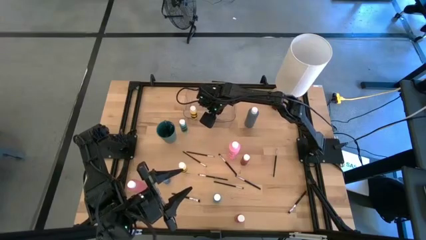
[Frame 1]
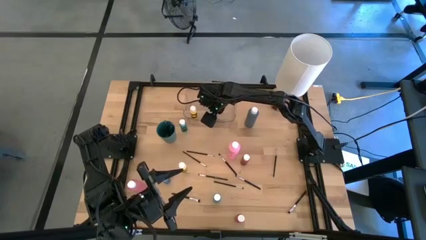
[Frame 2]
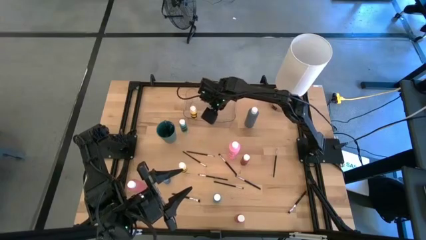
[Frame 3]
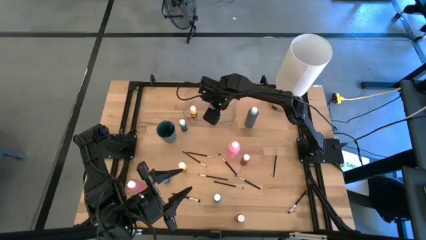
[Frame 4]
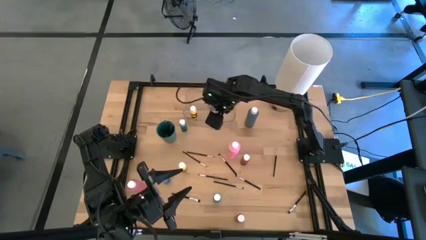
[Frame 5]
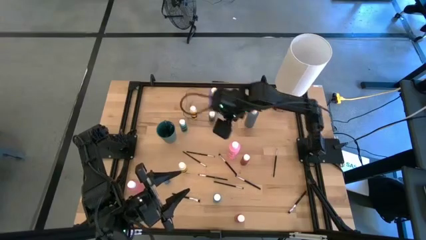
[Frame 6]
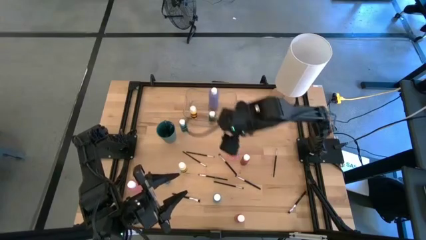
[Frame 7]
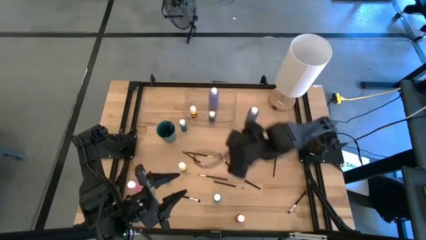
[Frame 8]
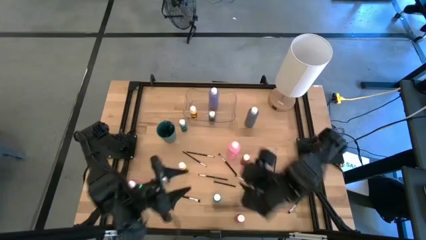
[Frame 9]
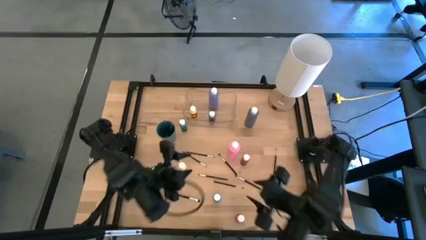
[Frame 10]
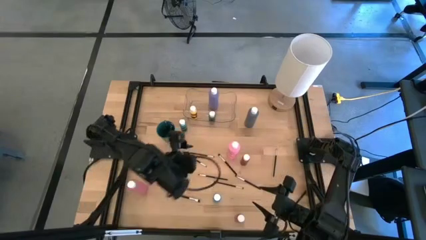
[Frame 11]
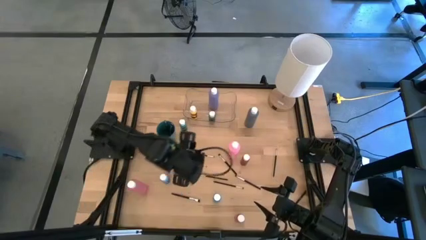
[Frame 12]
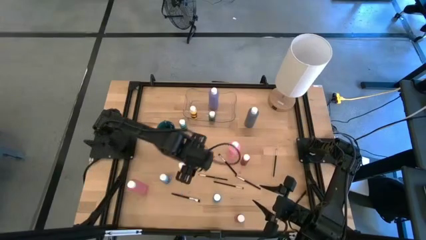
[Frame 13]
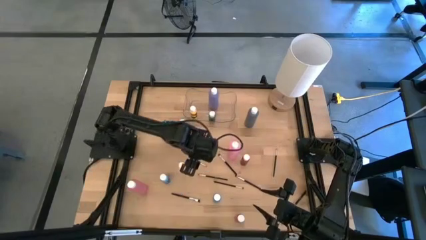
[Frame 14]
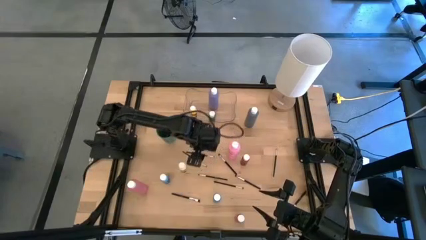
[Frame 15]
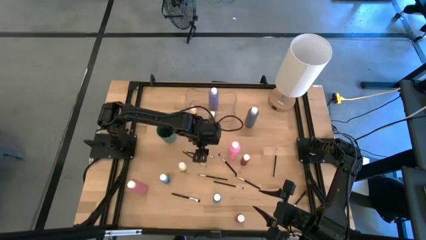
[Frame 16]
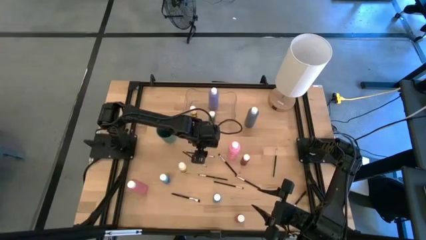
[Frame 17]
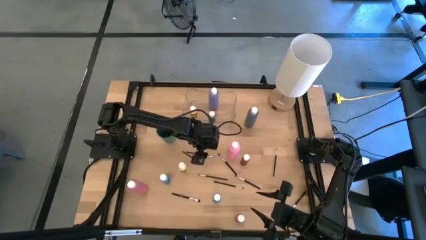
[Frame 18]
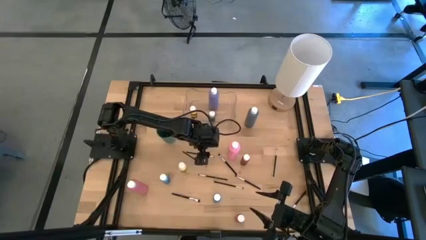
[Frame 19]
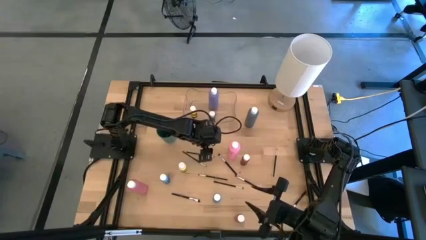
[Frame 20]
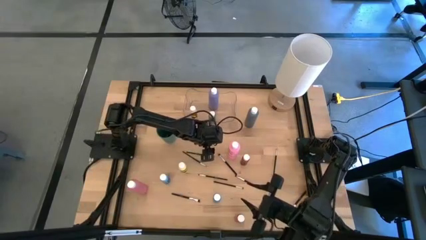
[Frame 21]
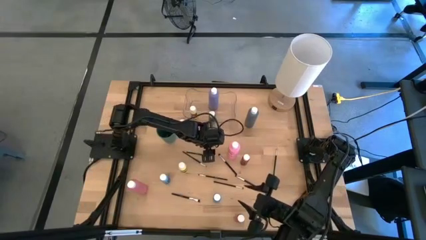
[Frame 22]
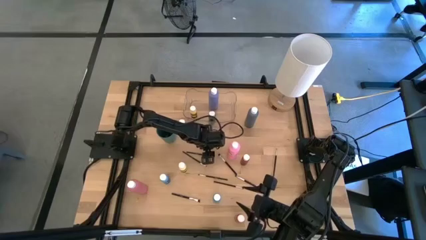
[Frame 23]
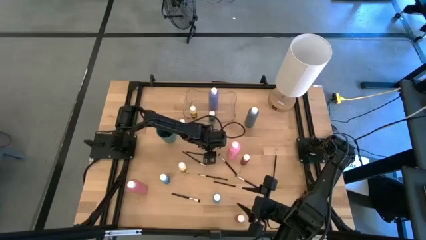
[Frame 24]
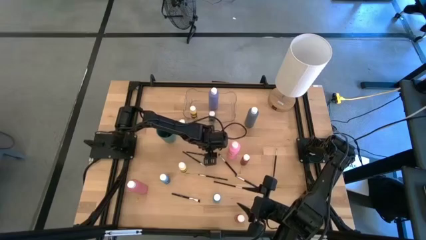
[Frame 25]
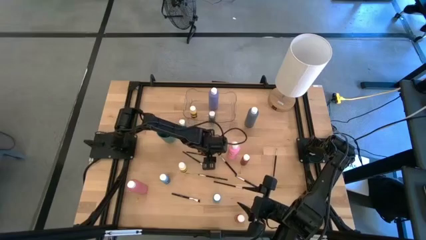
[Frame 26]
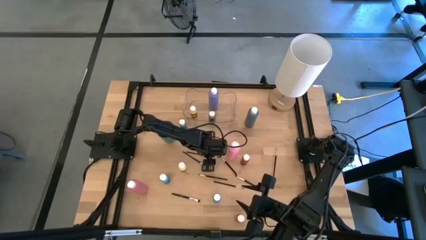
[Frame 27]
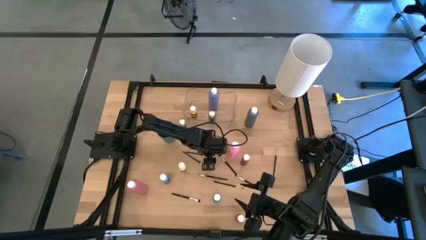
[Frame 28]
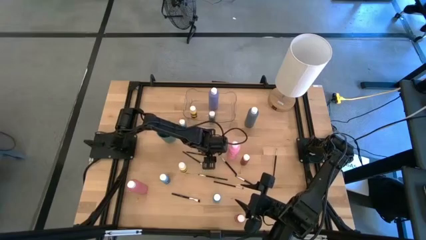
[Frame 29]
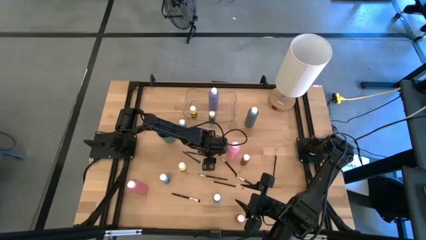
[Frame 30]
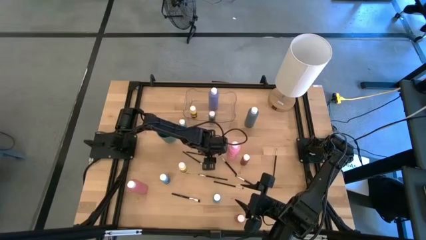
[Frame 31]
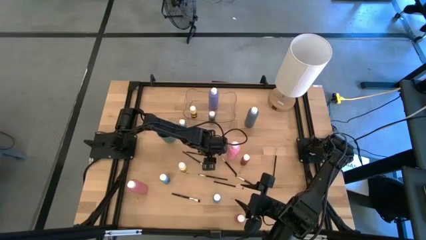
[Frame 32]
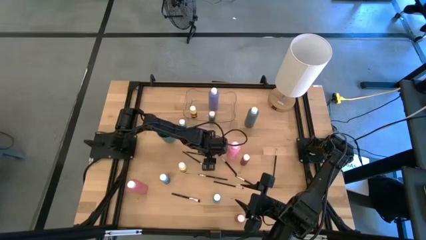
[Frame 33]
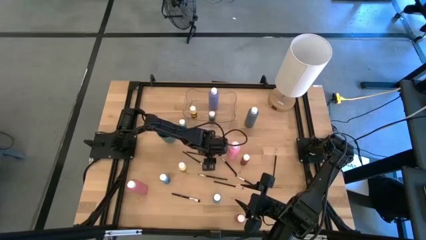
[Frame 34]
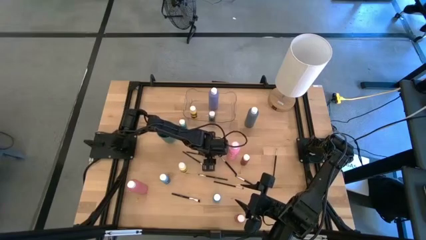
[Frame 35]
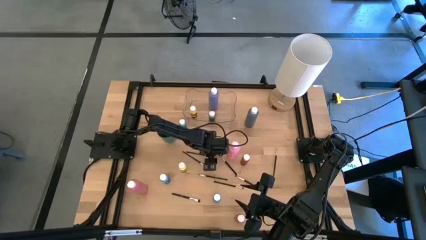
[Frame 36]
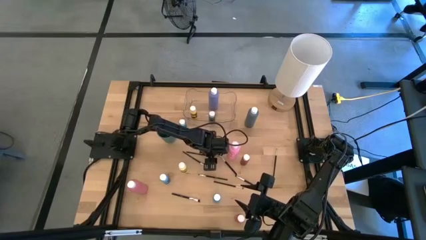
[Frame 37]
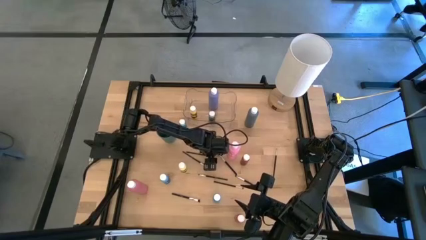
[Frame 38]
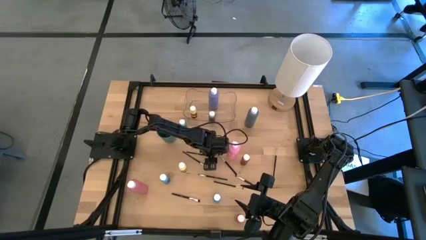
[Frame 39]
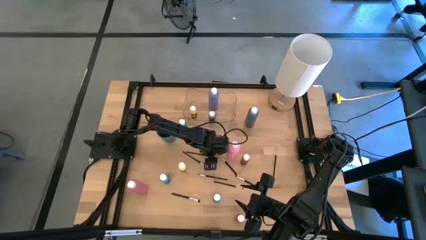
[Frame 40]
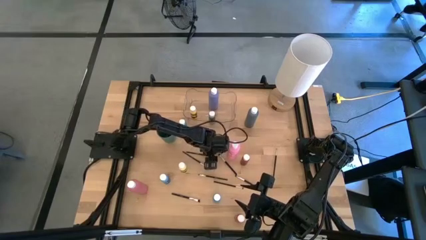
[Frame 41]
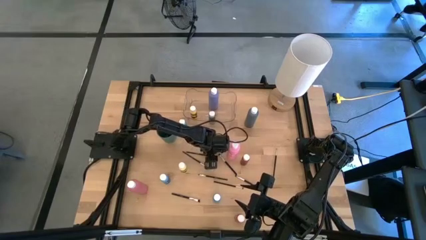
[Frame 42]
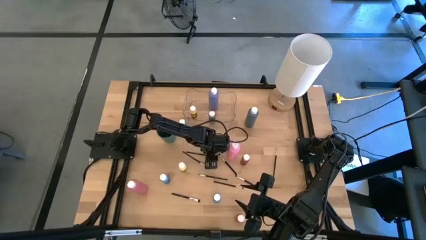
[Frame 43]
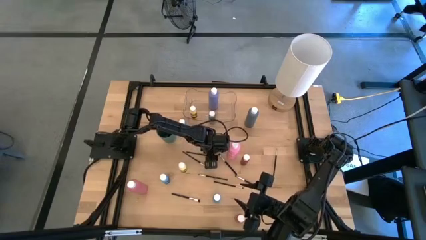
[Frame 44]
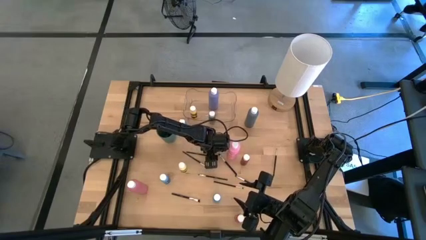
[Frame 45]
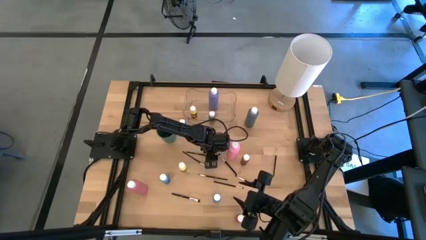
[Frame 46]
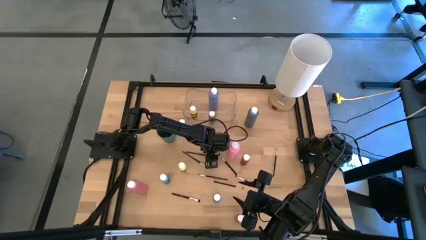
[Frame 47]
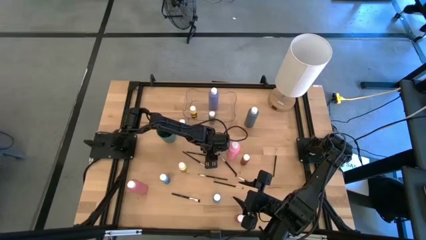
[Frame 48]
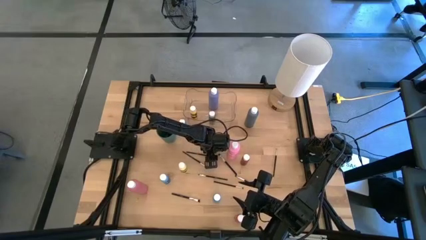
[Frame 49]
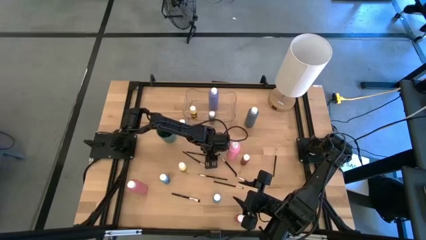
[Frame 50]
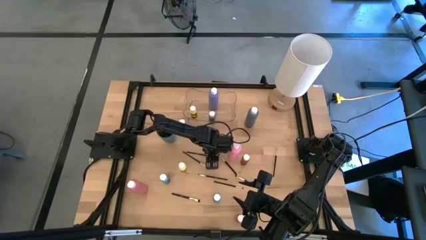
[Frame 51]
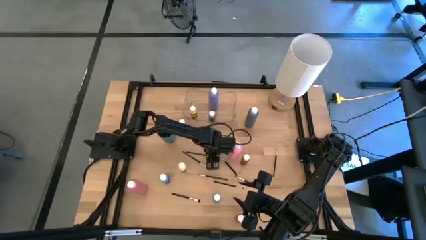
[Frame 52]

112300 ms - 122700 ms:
Task: Pick & Place Paint Supplies
Put the black paint brush into the green cup

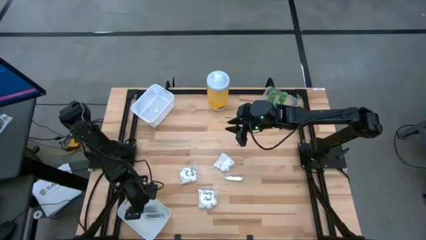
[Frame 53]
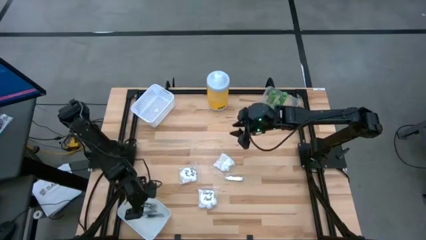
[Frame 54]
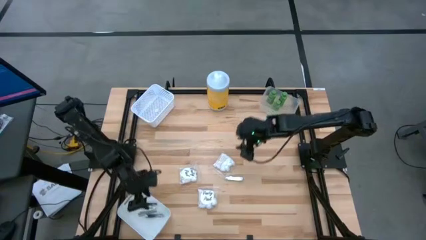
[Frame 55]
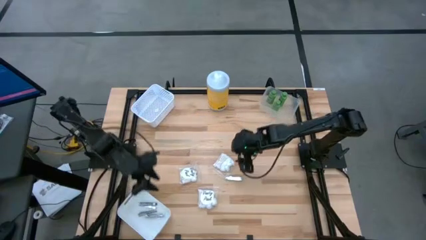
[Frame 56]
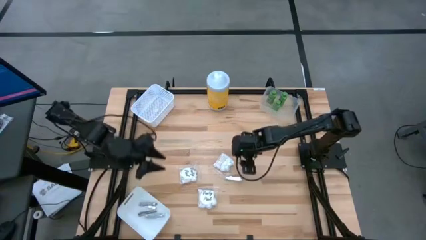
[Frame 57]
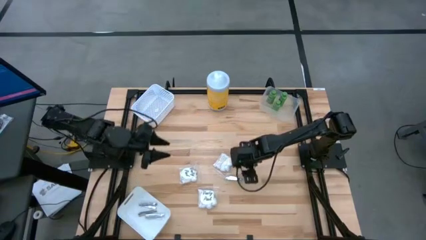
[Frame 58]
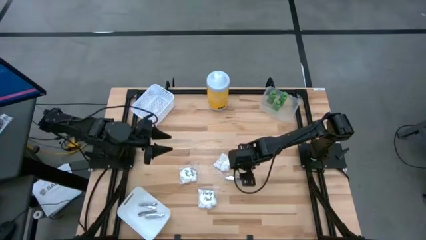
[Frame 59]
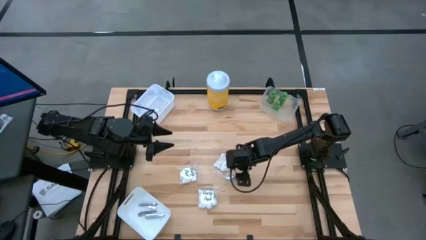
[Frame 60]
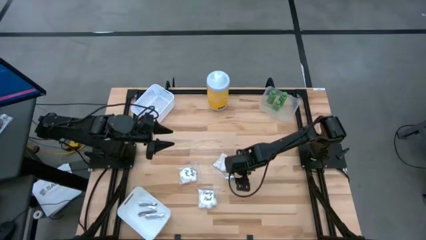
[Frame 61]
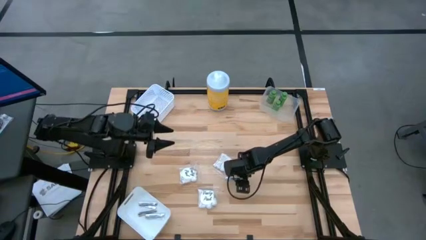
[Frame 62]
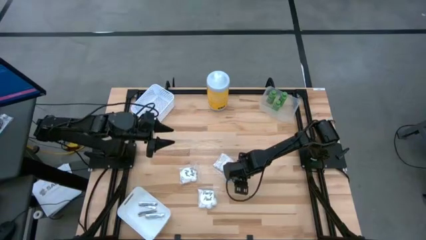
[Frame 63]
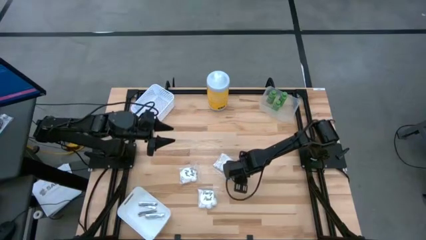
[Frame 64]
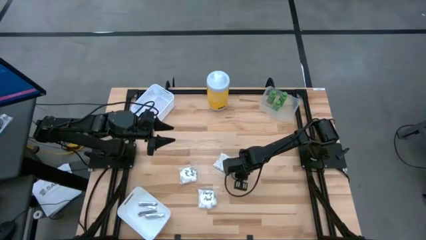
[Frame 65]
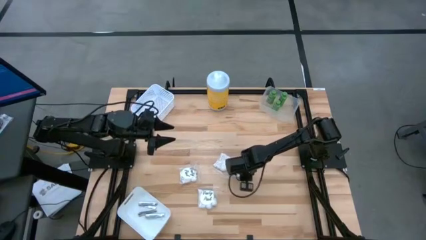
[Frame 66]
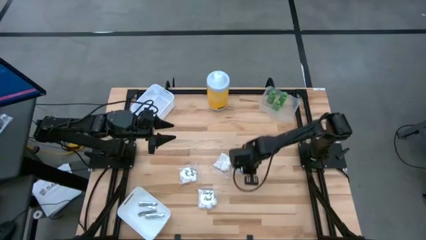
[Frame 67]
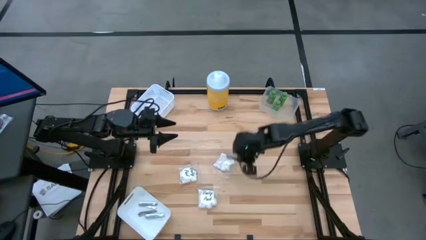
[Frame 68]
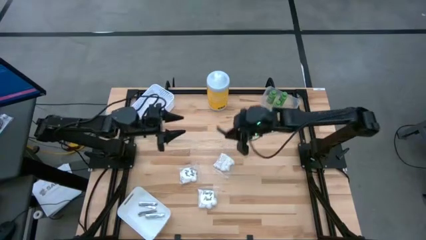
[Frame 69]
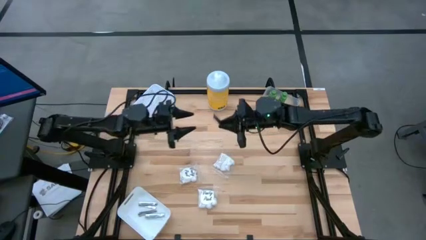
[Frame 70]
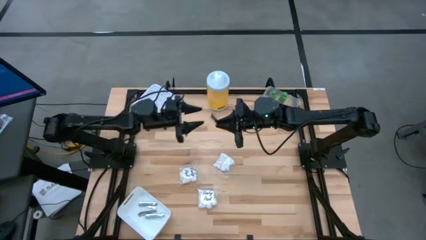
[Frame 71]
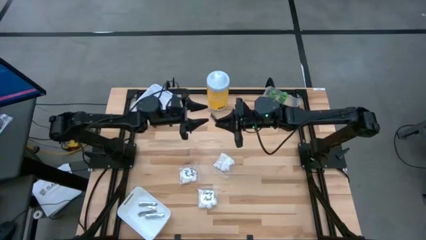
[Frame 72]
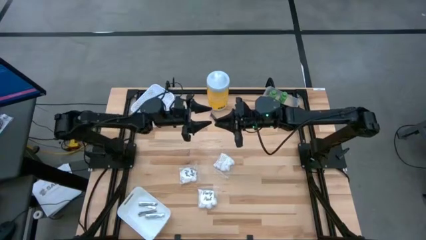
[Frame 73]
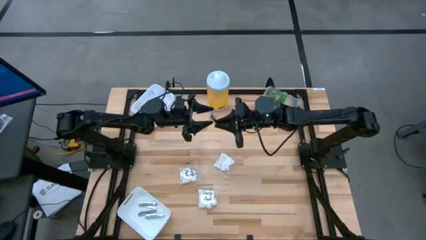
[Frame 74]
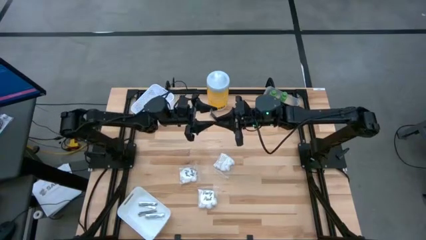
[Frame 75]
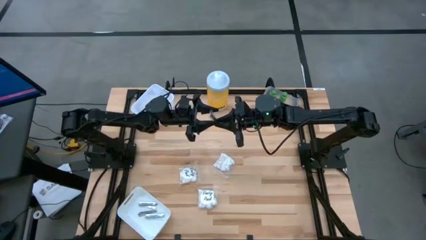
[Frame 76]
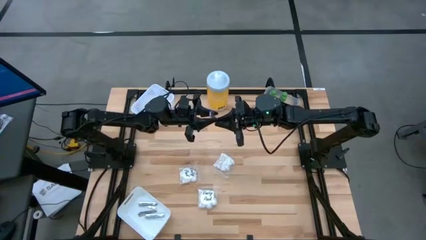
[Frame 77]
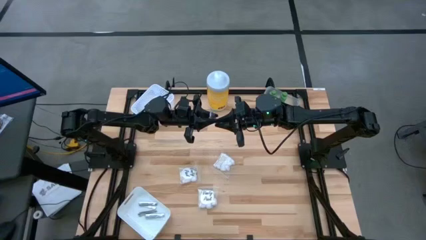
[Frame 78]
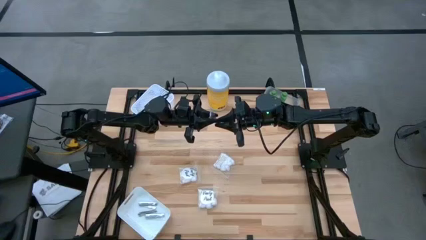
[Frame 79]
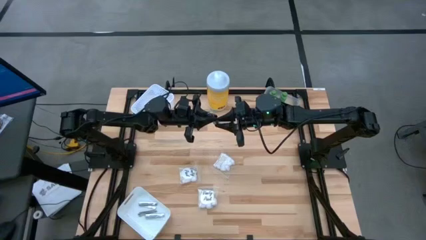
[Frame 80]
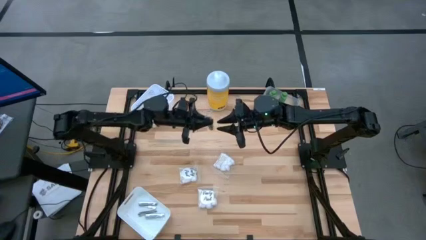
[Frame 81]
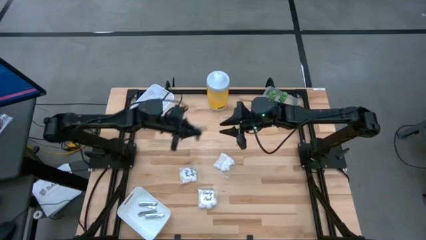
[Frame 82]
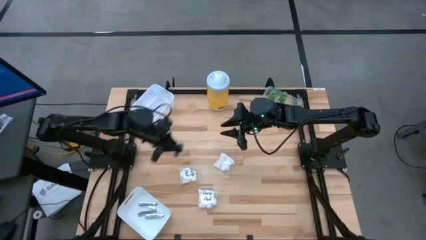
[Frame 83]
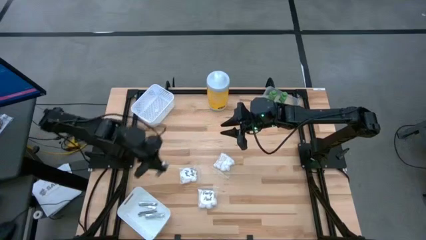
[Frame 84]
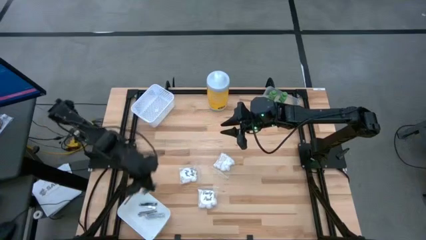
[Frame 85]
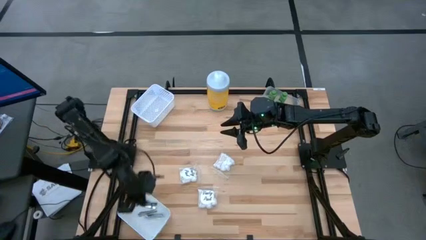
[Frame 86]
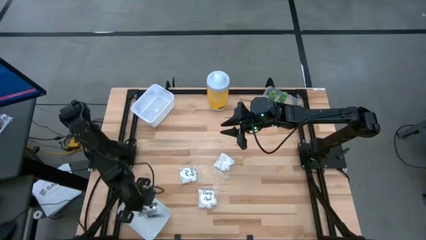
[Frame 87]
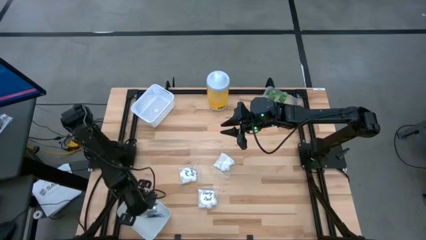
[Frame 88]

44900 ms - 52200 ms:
Task: Pick & Place Travel size toiletries
Put the silver nail cutter into the white bin
